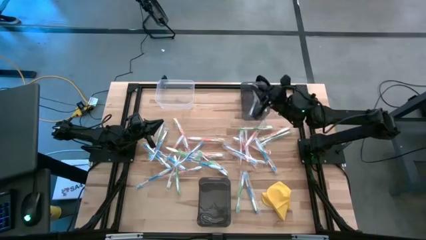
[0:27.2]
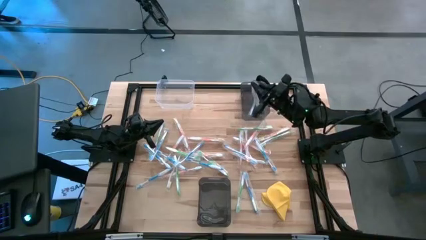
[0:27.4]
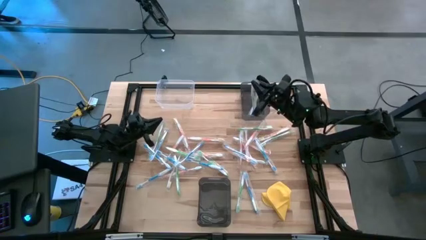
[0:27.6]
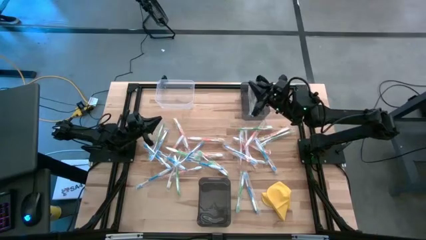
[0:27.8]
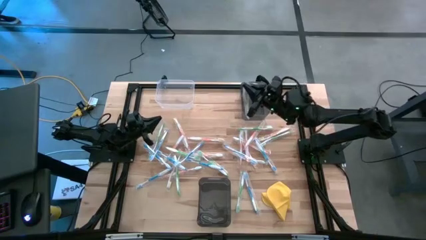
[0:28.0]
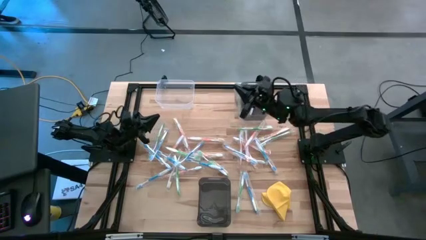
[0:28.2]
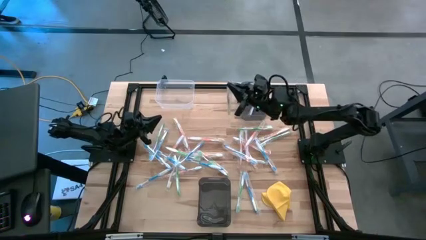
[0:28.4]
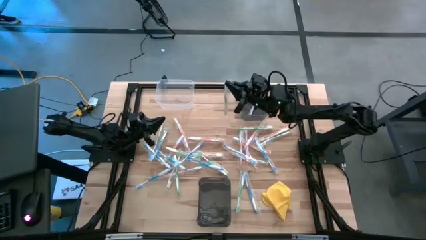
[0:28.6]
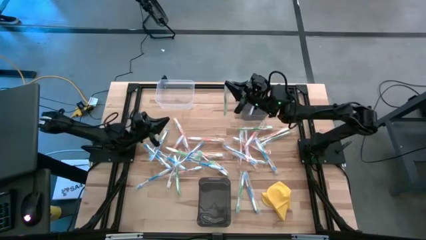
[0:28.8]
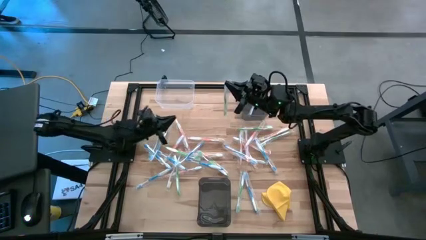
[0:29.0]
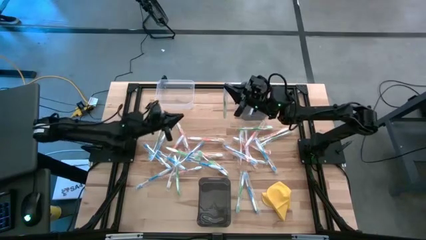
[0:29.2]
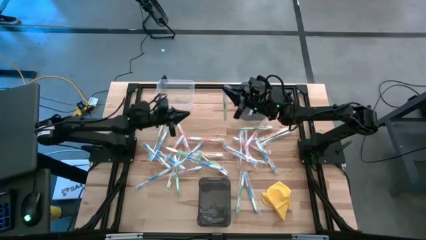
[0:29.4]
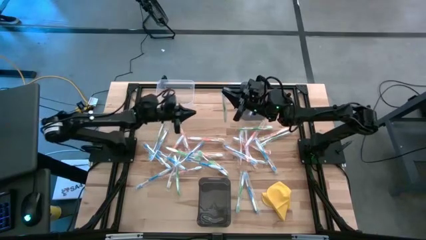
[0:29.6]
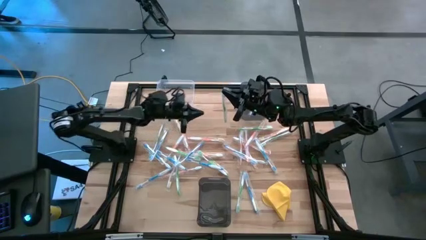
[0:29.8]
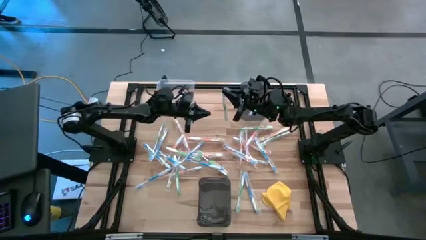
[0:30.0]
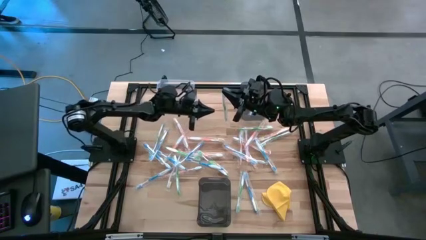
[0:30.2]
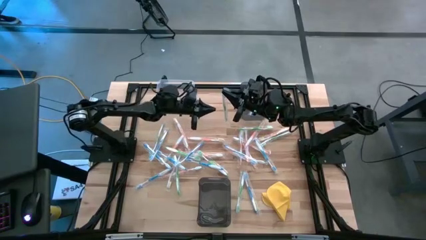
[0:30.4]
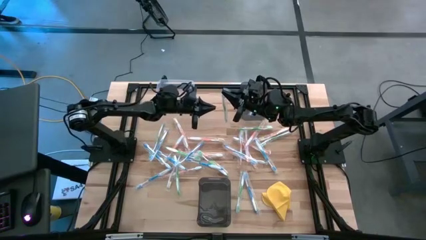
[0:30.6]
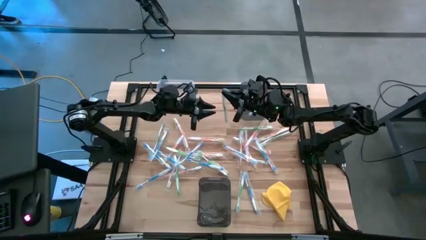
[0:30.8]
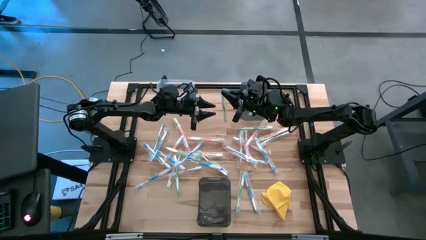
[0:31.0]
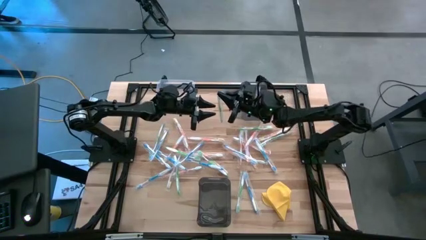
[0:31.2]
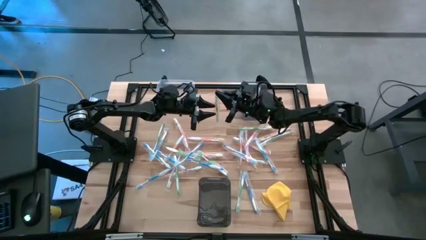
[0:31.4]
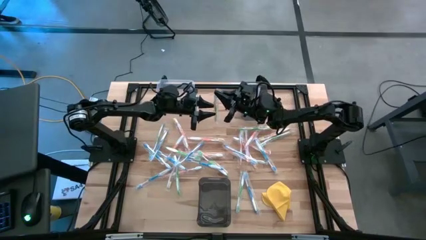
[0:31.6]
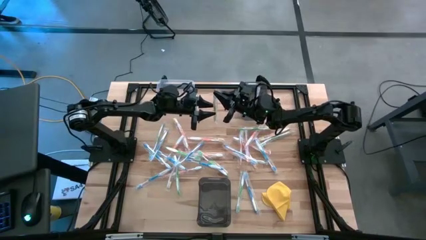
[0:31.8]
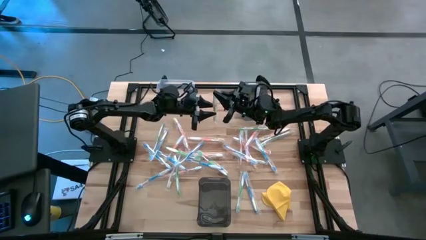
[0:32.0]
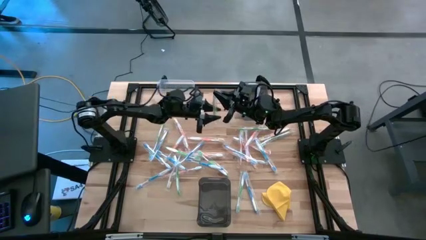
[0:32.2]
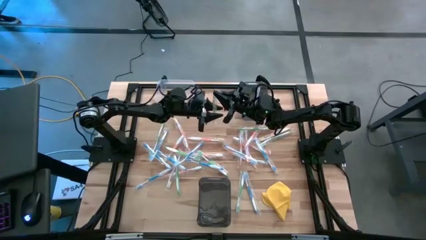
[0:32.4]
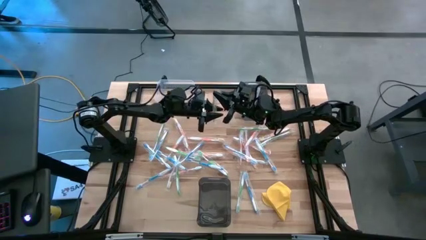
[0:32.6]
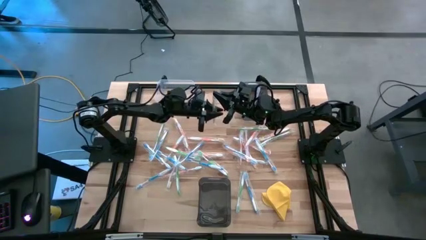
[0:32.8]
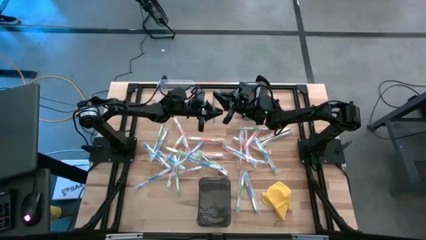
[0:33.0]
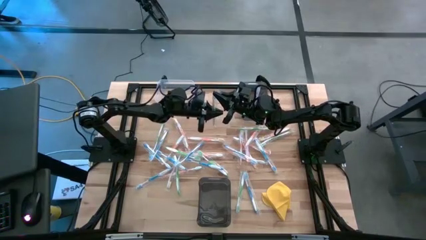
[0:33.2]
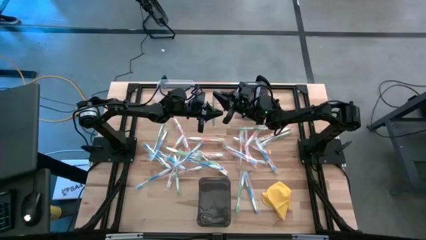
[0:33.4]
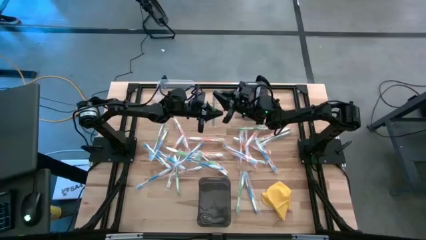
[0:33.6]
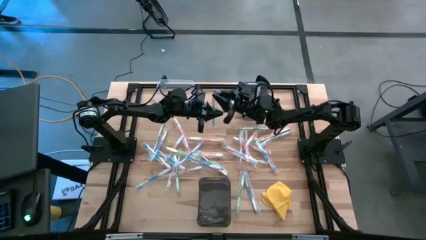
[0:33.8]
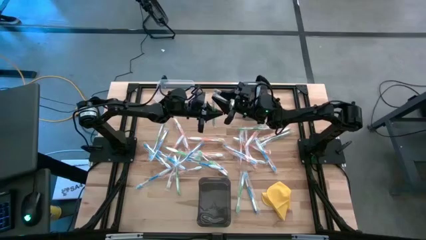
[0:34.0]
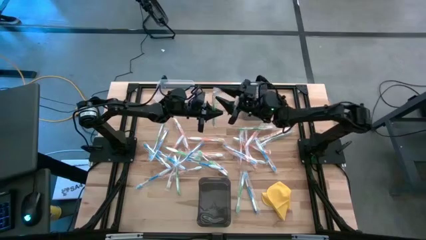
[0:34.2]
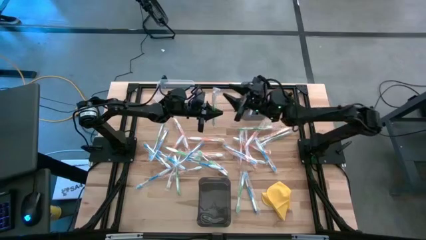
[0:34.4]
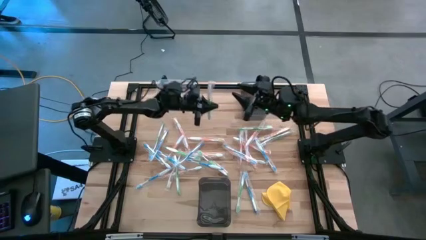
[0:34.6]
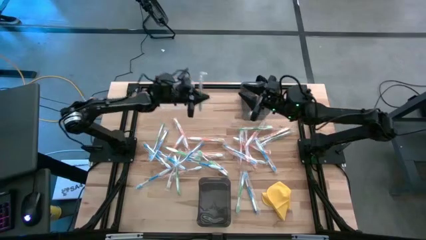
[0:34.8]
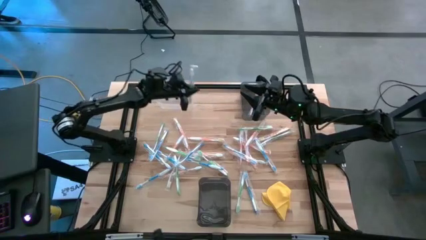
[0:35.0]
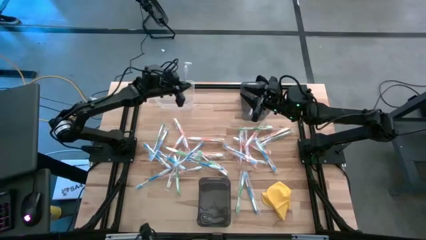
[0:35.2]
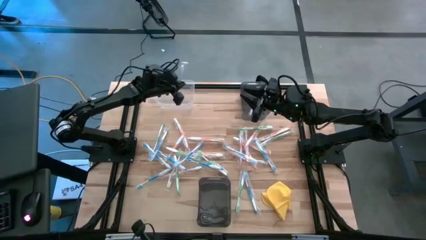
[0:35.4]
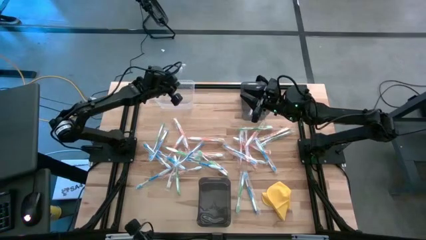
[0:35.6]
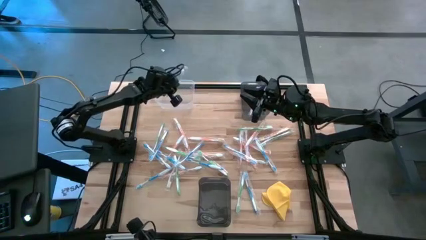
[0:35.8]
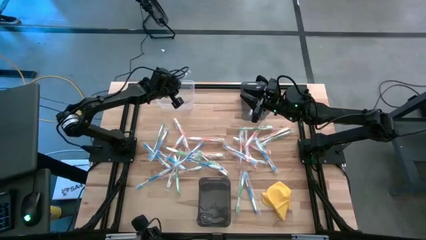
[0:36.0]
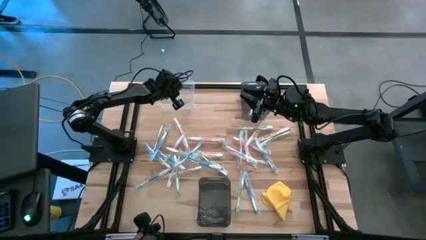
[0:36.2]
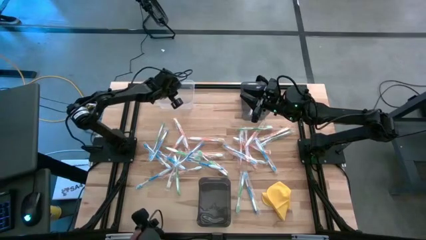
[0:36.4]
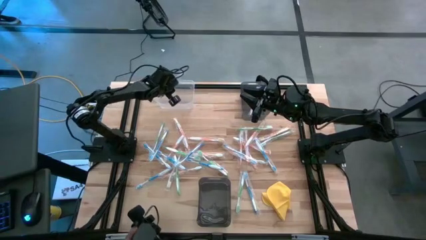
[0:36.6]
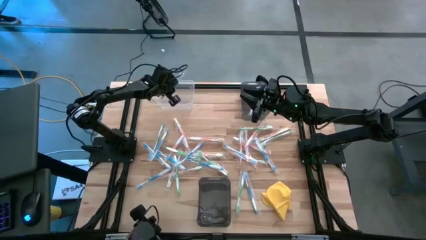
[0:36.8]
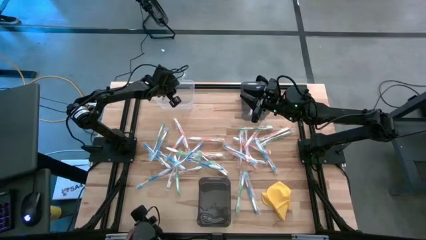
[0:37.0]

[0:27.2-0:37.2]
Task: Pick & Place Toothbrushes
Put the green toothbrush into the transparent bin

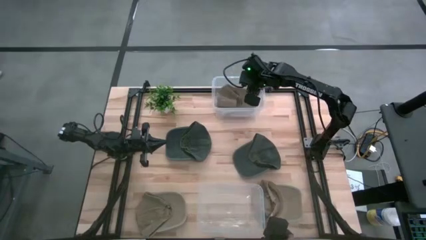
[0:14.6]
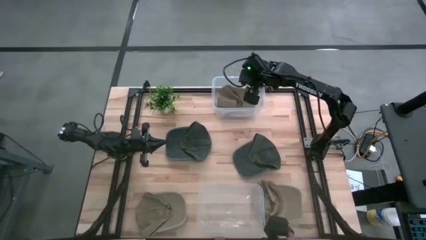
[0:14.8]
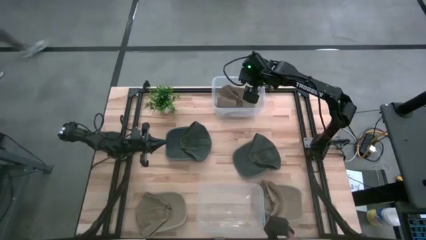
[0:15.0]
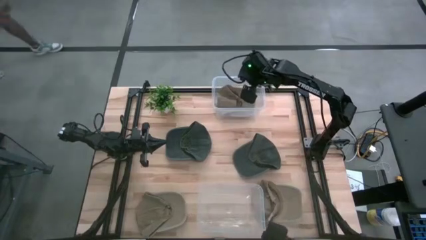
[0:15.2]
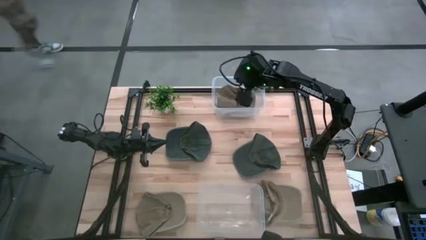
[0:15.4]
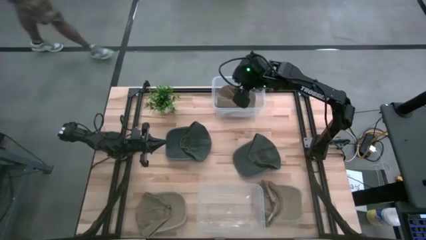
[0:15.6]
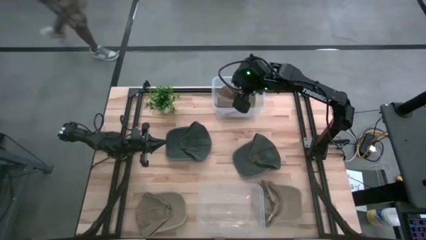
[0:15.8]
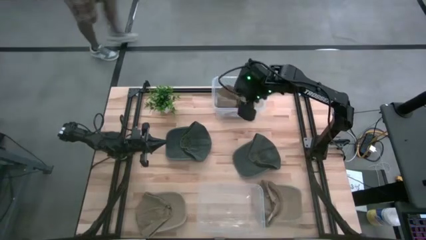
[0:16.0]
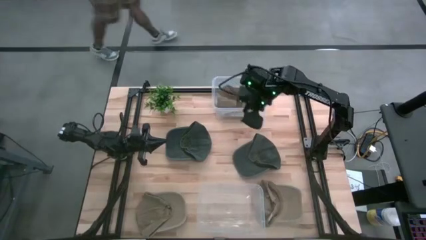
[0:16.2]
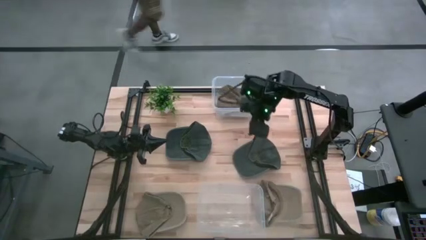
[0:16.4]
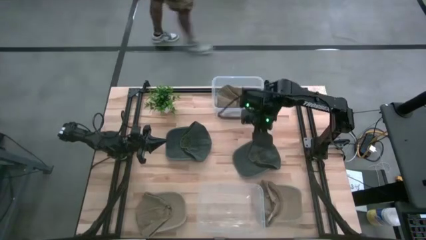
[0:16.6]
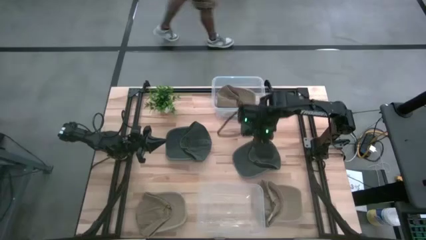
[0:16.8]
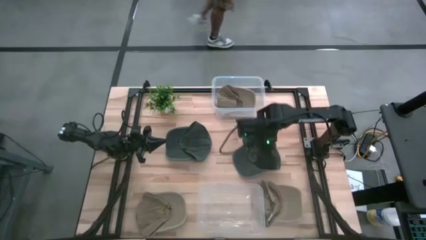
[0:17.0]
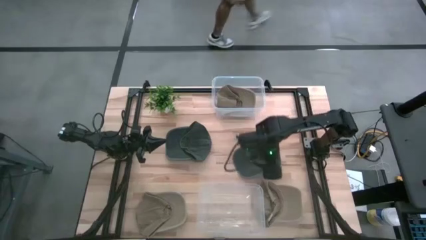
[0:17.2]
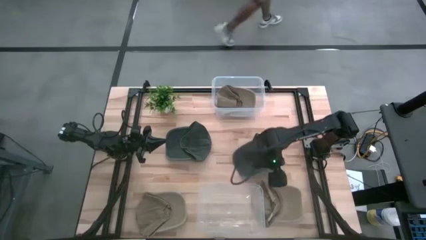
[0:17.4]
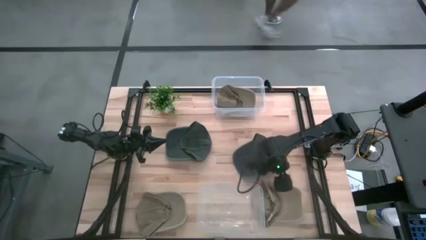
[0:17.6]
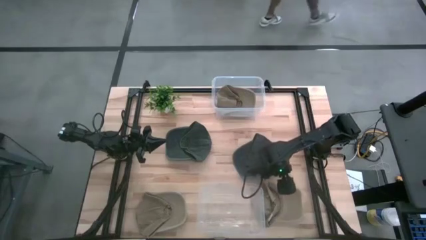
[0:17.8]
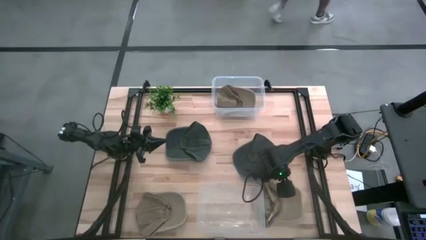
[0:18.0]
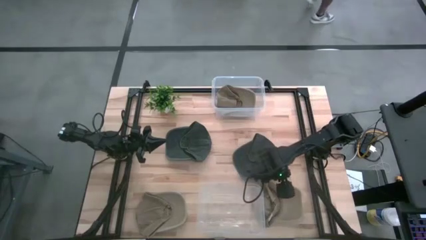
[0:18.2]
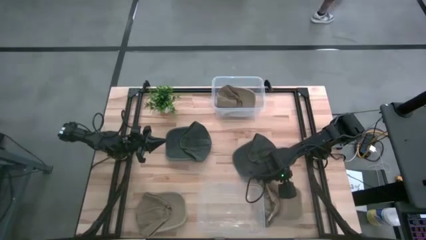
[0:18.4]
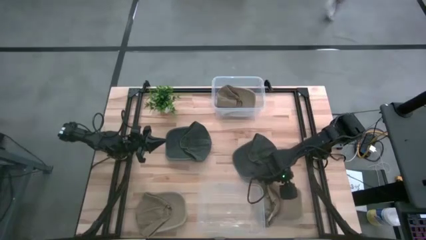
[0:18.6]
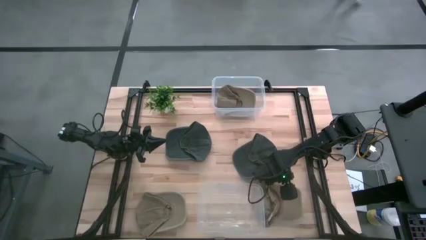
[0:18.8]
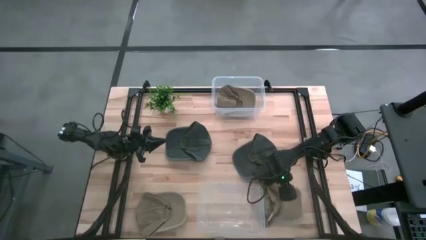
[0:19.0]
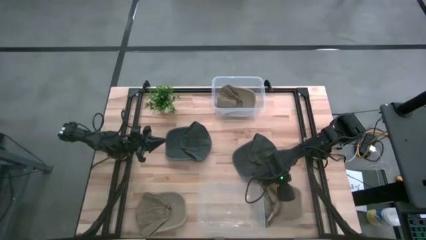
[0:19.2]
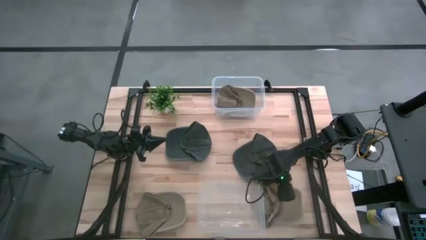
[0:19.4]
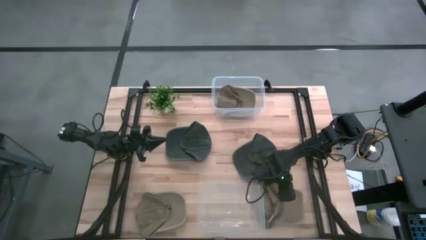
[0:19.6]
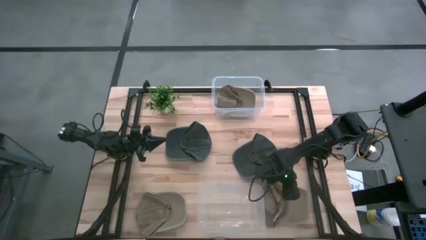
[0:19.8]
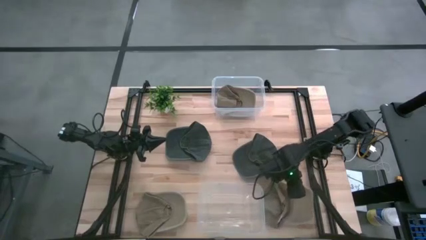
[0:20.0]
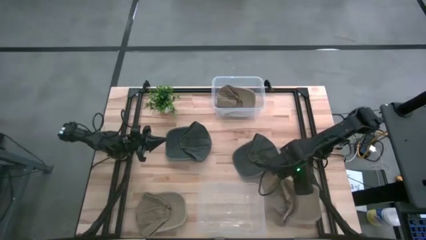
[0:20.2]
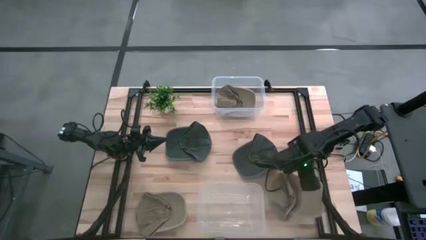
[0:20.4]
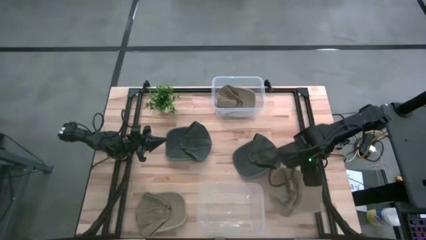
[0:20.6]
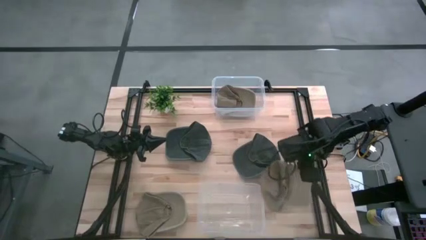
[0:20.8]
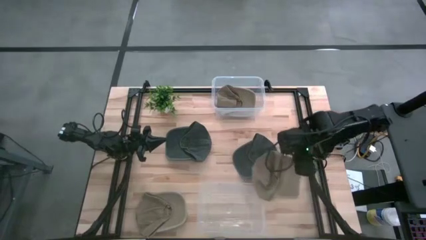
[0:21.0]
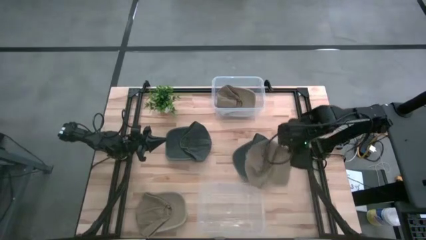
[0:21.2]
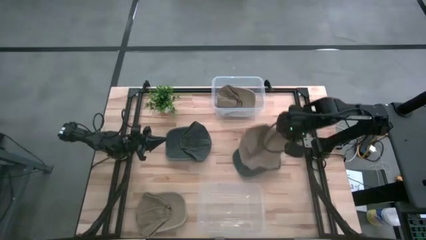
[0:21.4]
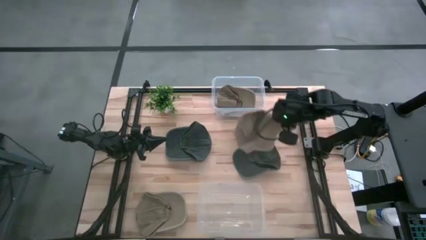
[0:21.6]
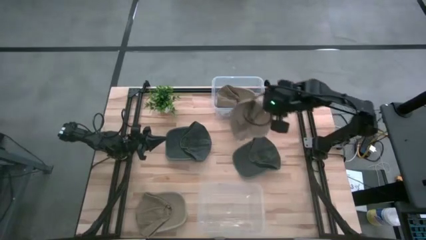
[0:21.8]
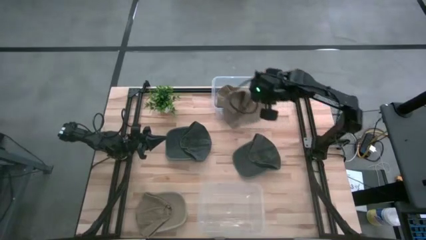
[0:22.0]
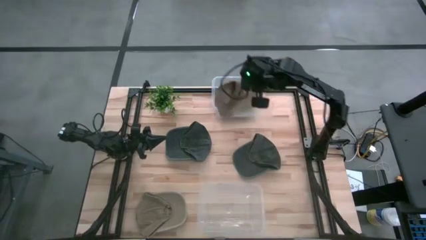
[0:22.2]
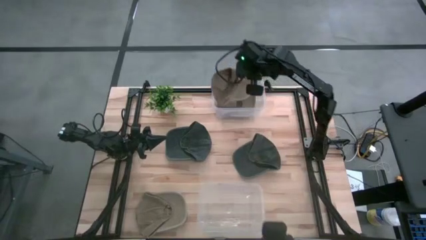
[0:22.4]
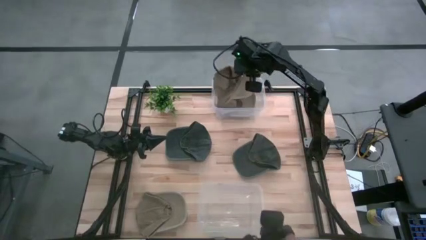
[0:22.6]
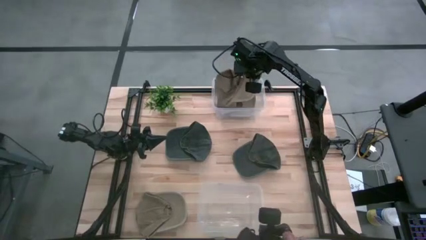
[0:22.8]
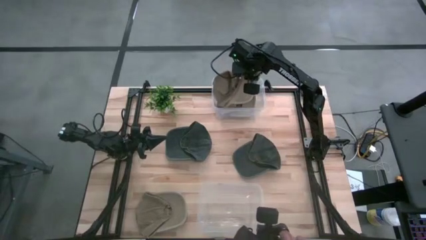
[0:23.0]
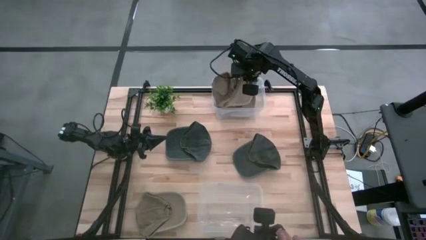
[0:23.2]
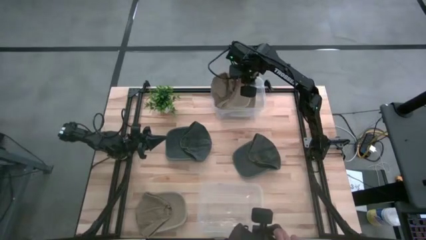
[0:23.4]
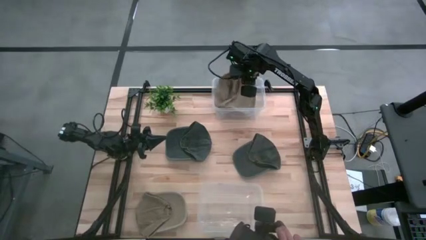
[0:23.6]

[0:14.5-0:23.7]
Task: Pick & Place hat
Put the right brown cap into the top transparent bin
